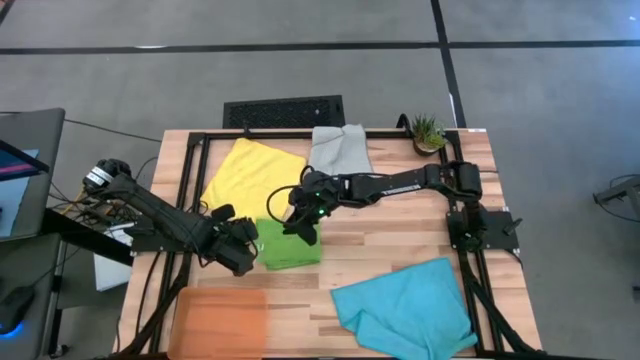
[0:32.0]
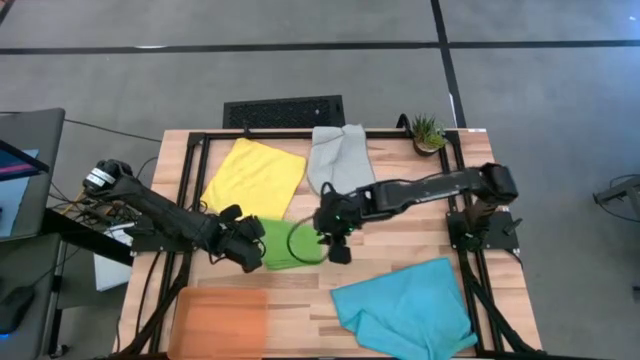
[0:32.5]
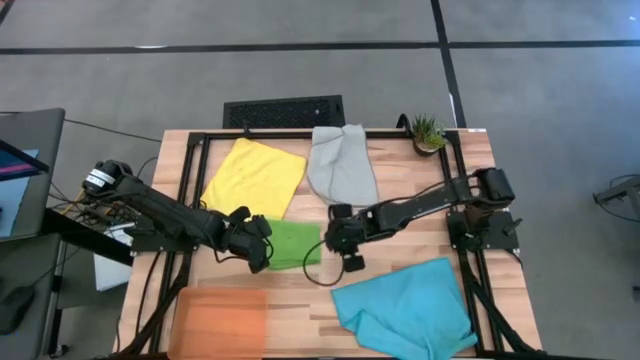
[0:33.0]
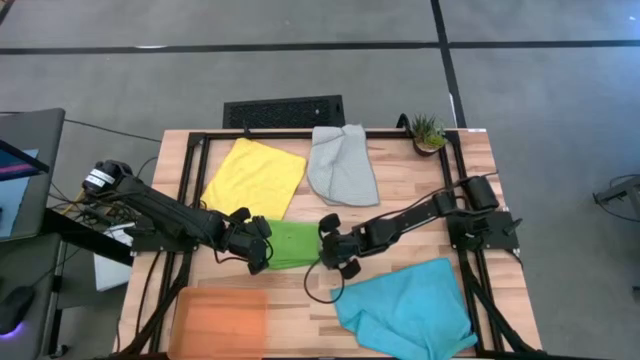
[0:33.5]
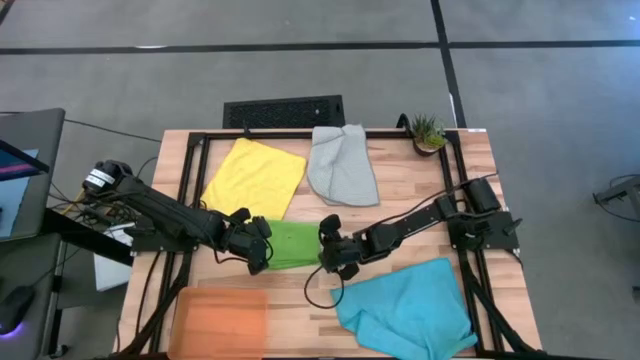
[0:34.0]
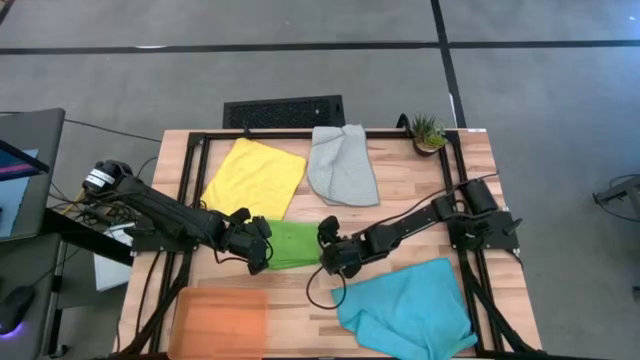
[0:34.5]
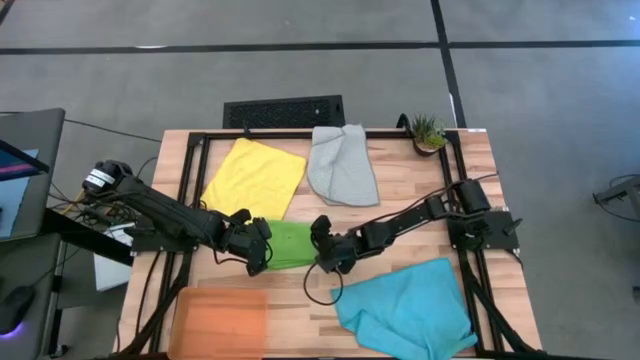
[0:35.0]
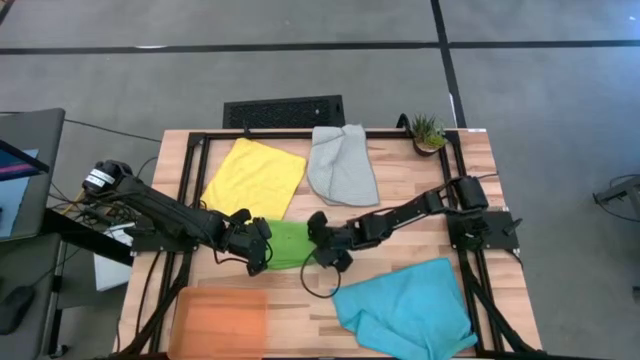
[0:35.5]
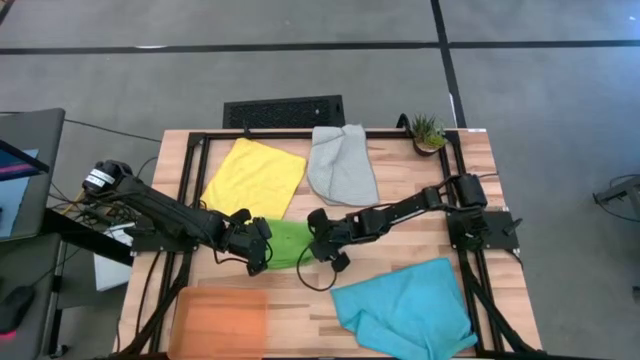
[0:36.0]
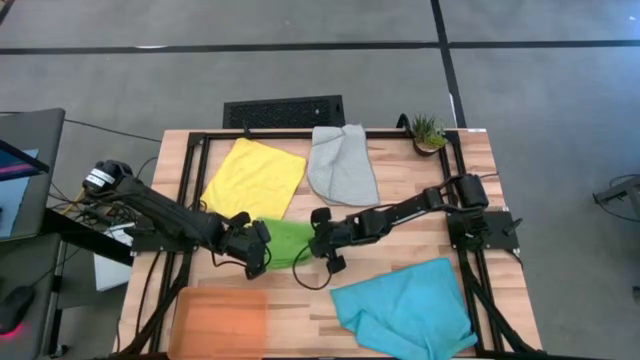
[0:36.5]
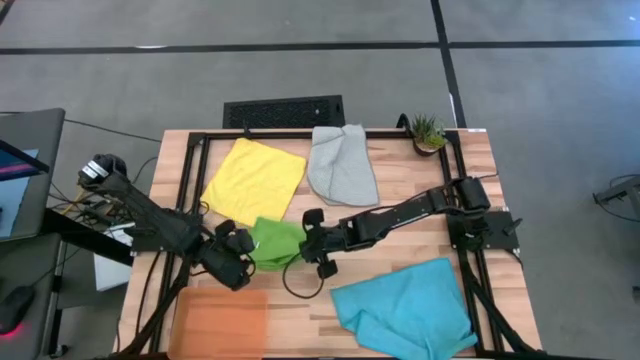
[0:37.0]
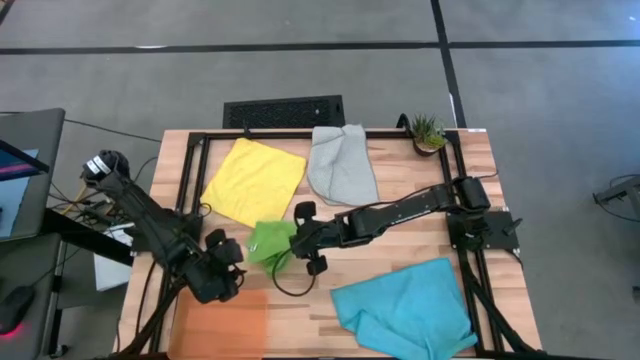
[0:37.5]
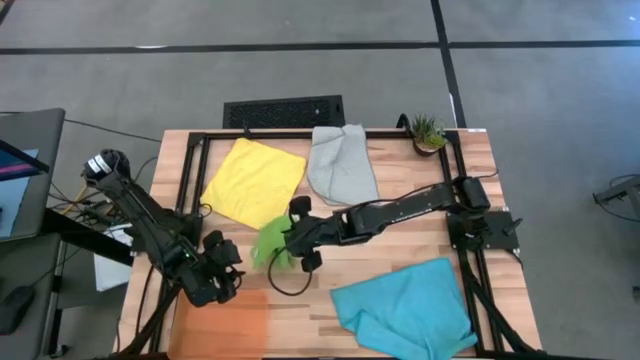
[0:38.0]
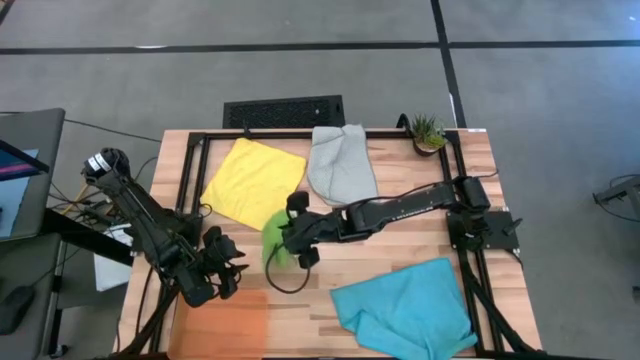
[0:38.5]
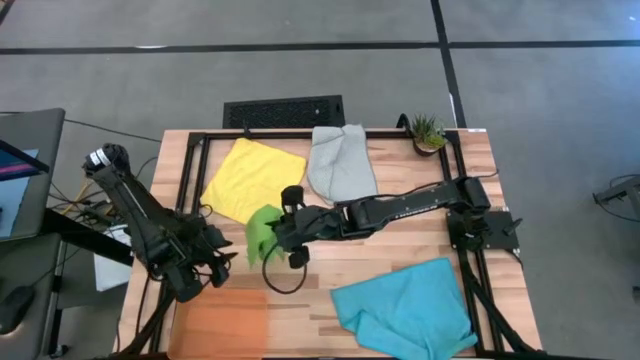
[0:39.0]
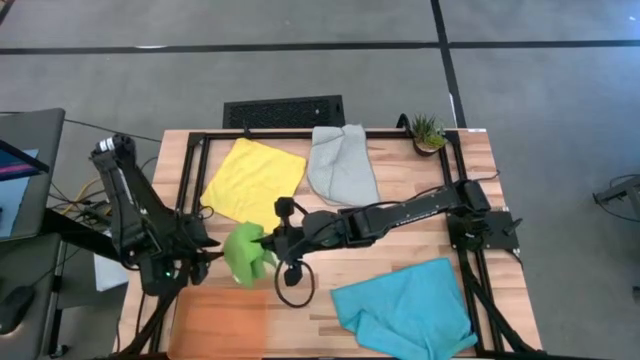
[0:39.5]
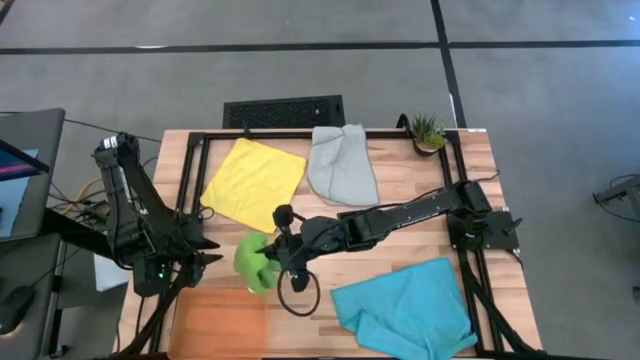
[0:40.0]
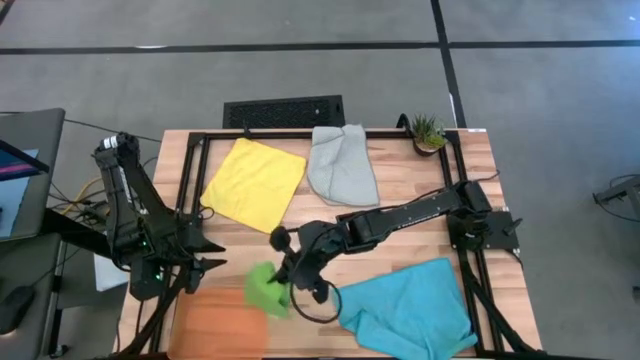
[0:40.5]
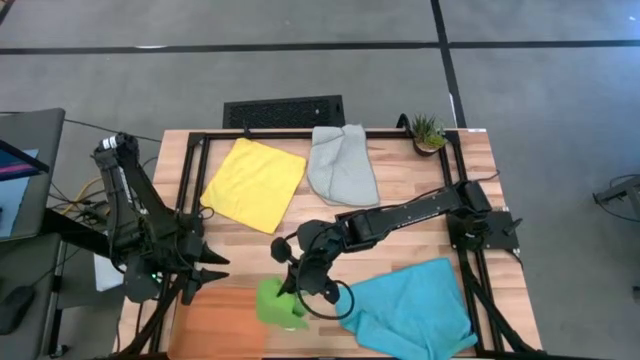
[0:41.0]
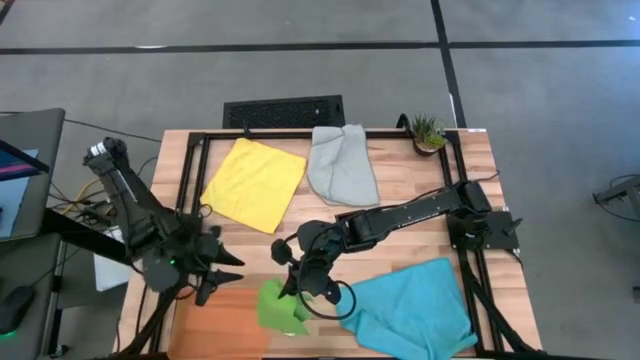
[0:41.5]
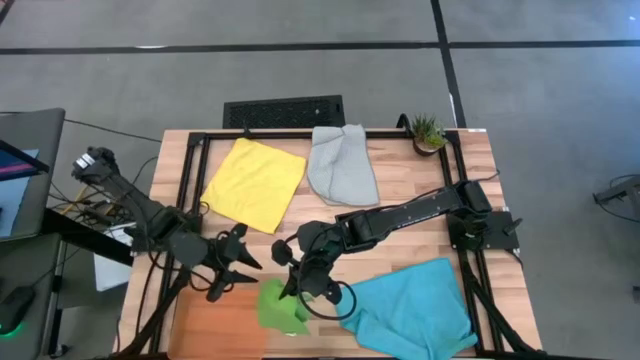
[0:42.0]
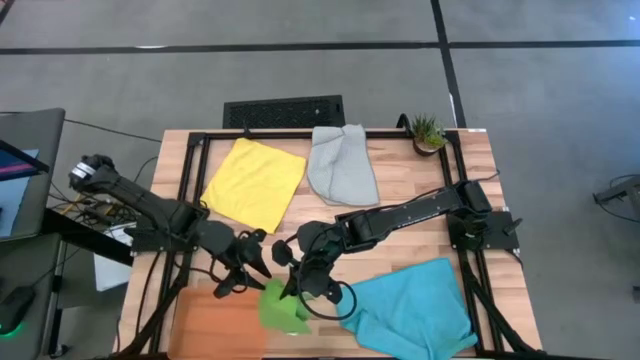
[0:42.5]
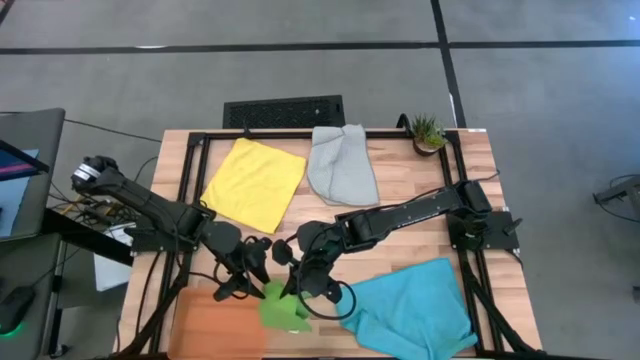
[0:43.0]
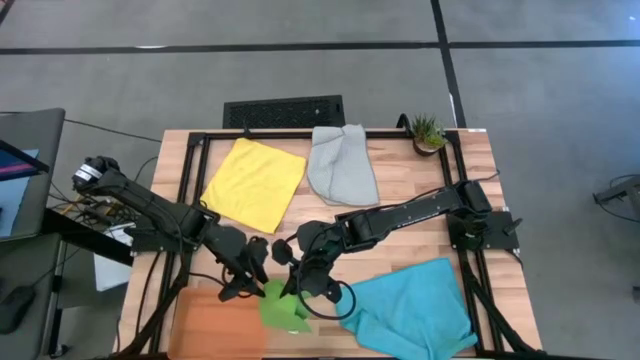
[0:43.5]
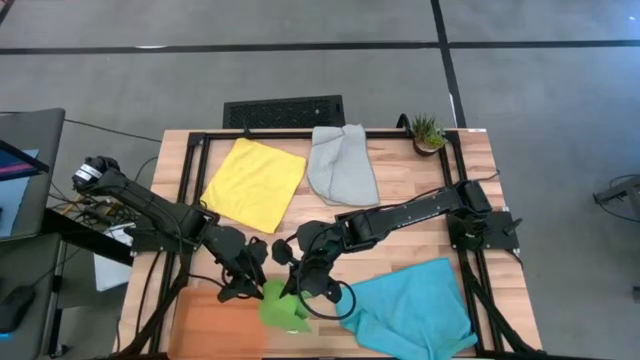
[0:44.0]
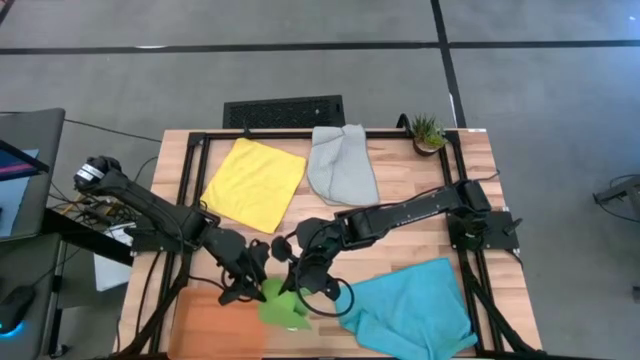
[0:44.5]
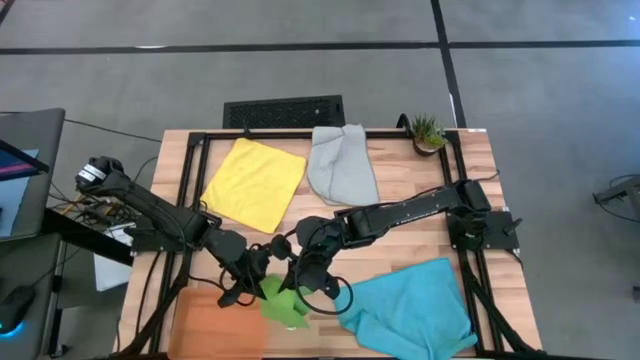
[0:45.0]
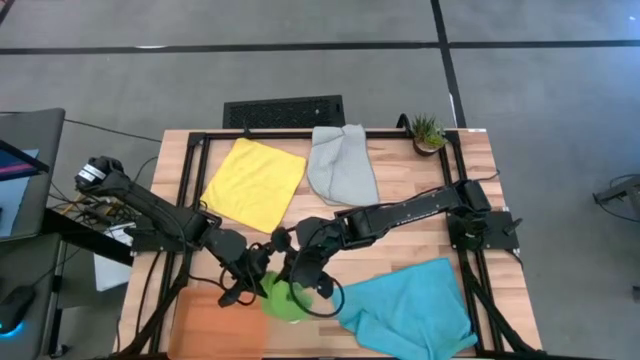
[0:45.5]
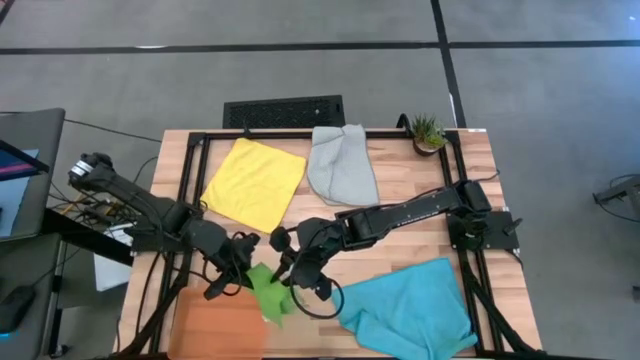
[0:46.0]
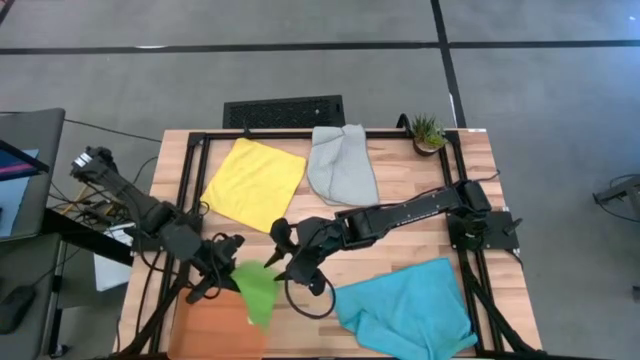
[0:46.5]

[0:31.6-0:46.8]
Task: Fold microfiber towels
Put the folded green towel into the orange bin
